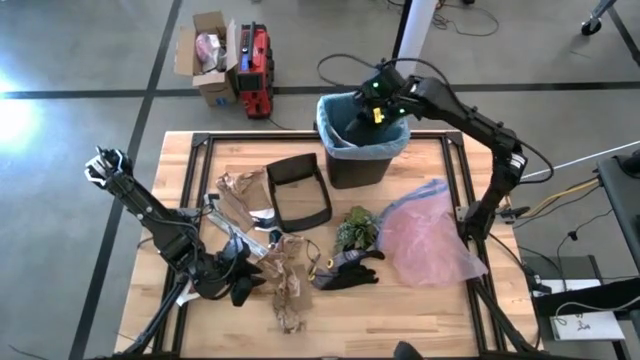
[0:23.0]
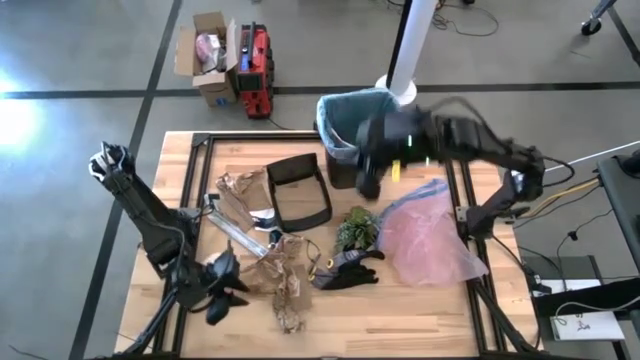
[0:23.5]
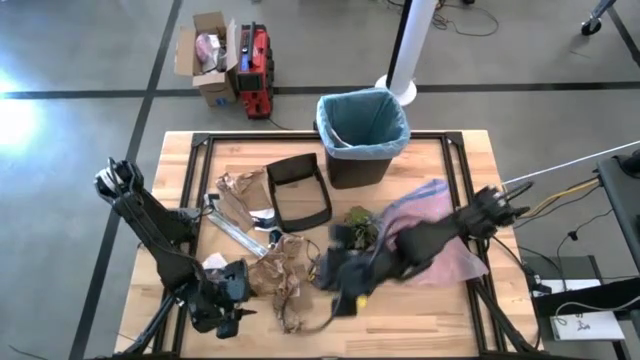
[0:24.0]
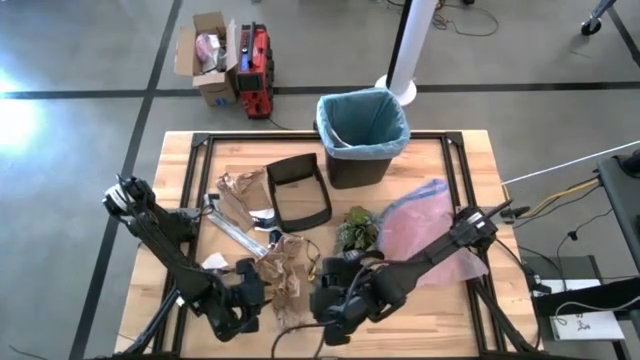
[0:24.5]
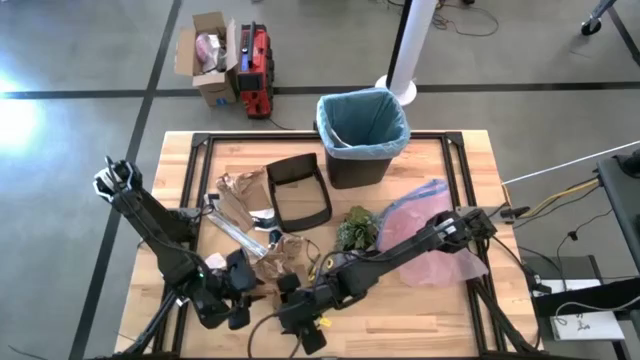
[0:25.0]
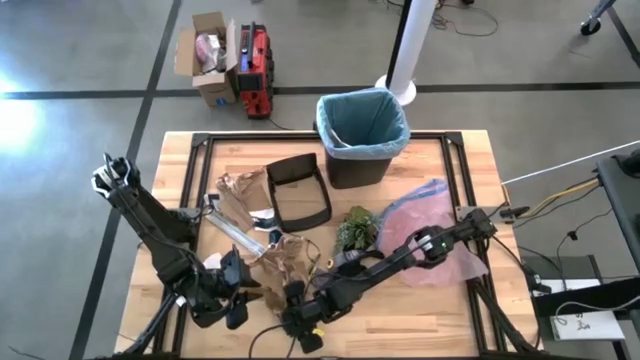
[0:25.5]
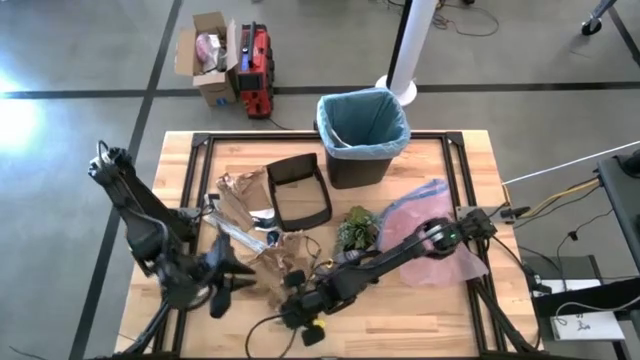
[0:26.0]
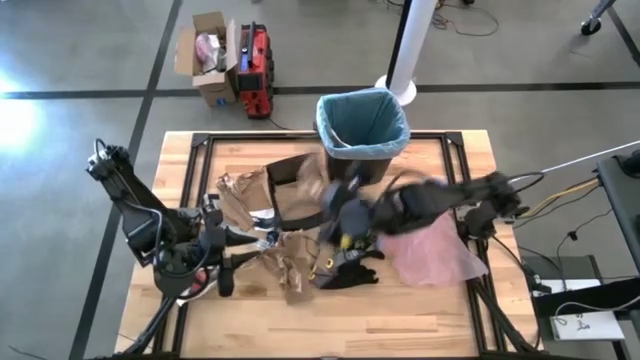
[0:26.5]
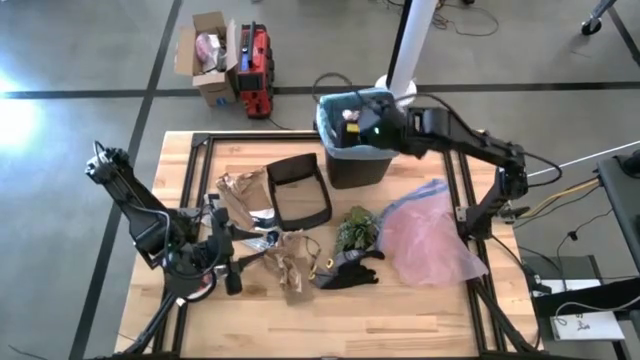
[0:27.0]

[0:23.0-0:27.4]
Task: place trash/remove bag and relplace
Put the brown napkin into the trash bin

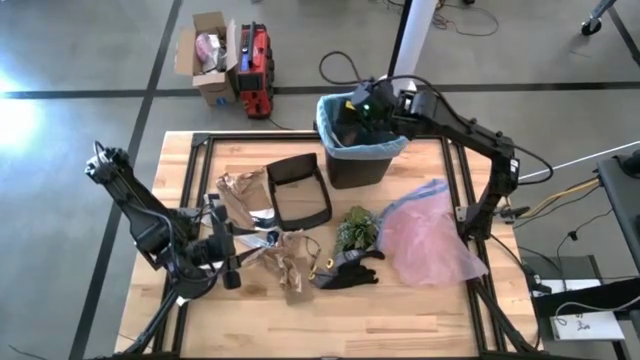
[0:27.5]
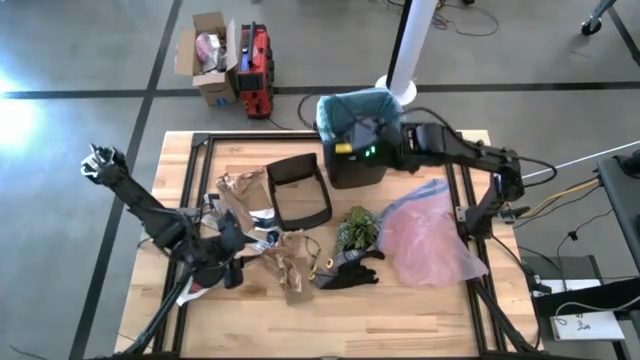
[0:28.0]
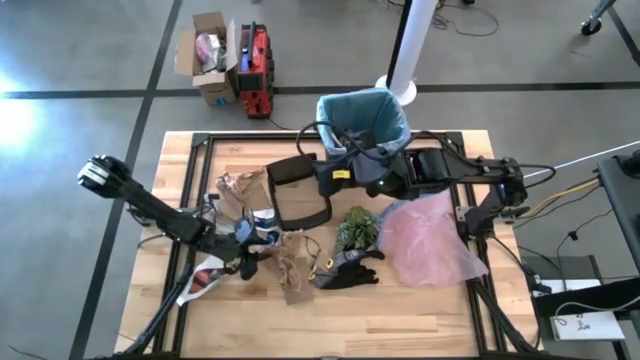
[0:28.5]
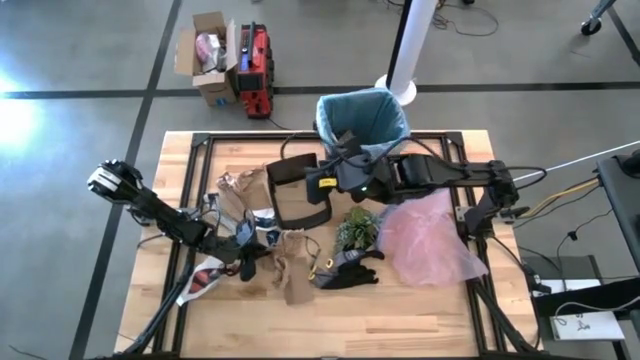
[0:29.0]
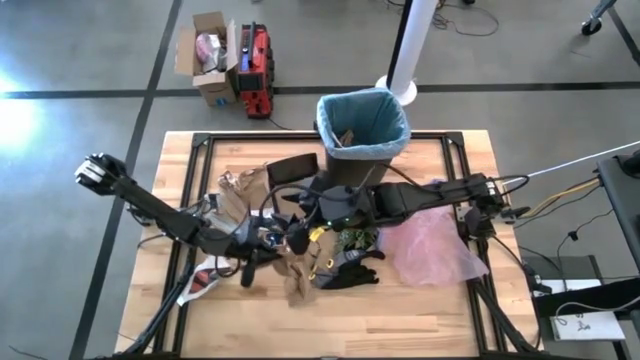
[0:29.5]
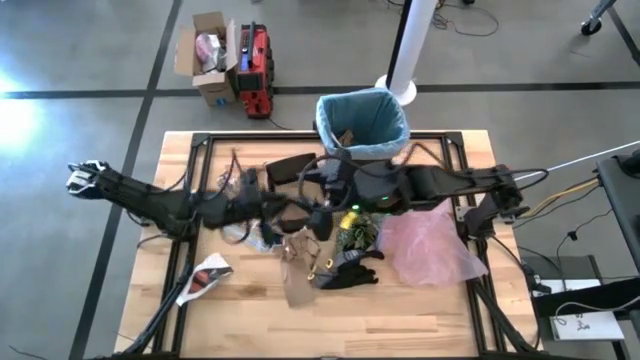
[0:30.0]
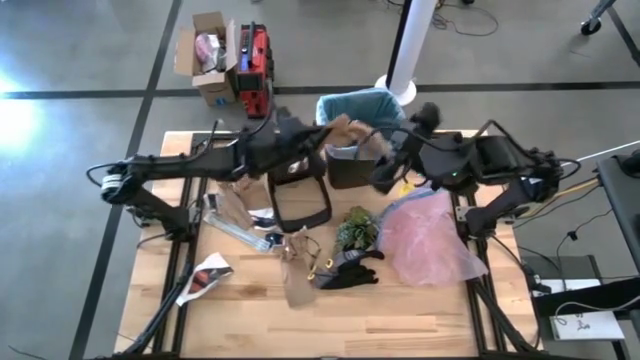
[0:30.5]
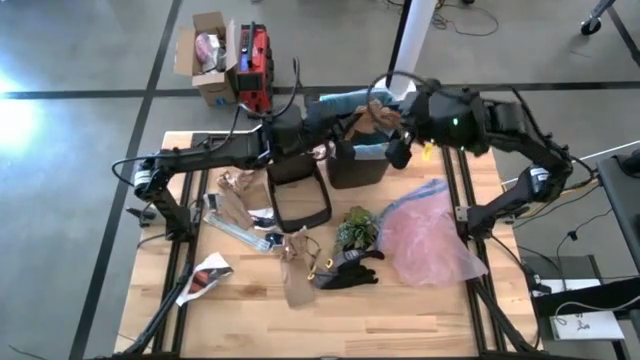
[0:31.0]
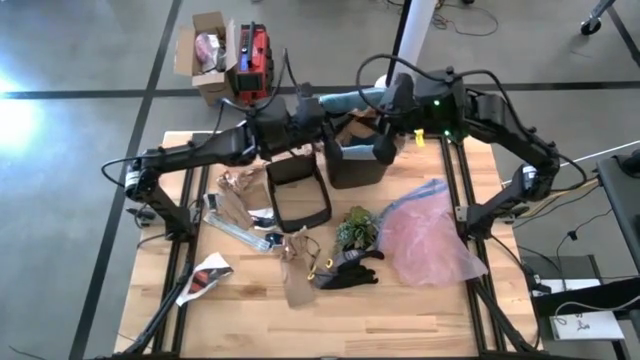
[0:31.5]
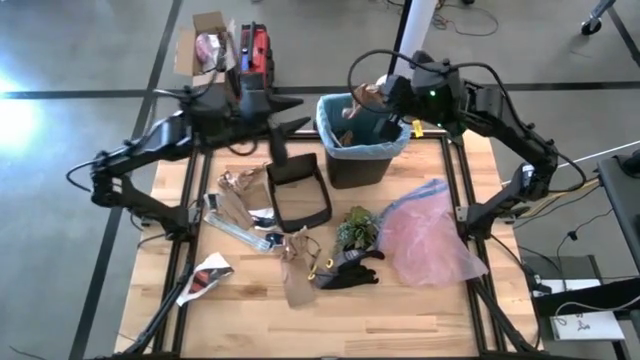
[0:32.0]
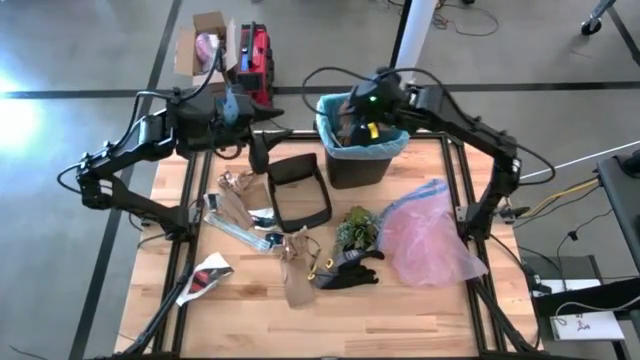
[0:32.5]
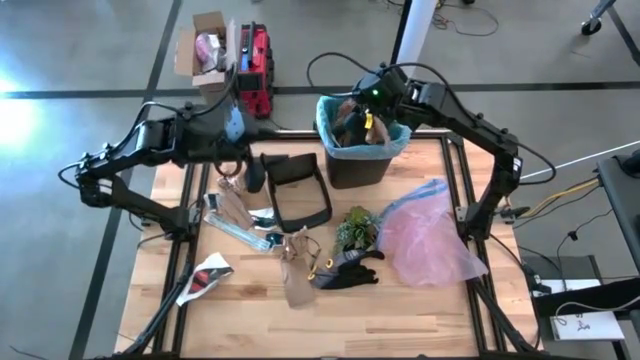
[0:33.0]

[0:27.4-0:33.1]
Put the brown napkin into the trash bin

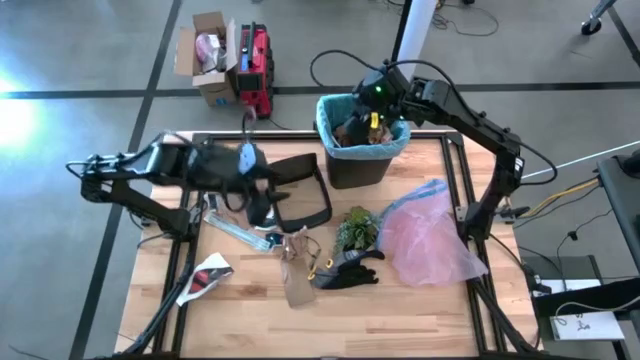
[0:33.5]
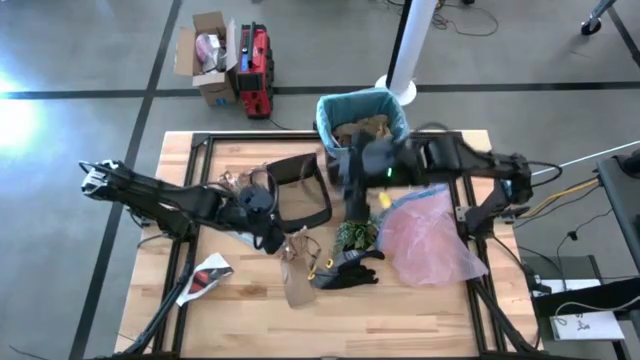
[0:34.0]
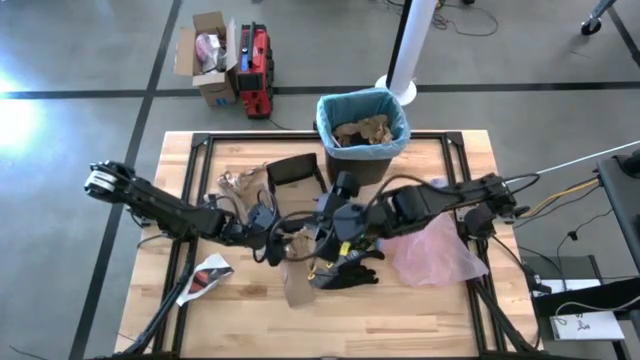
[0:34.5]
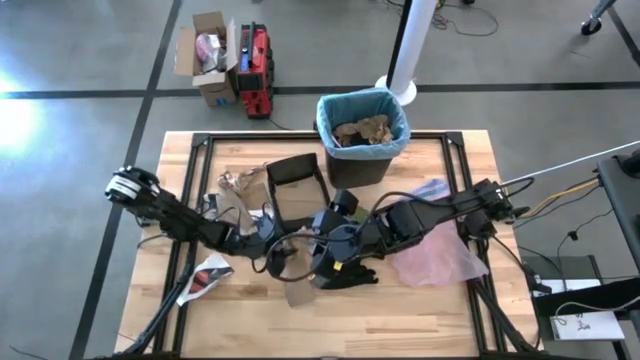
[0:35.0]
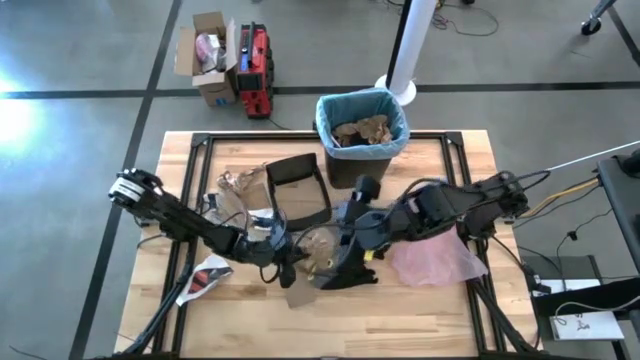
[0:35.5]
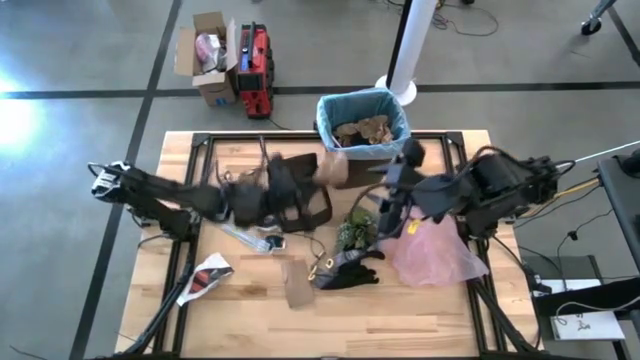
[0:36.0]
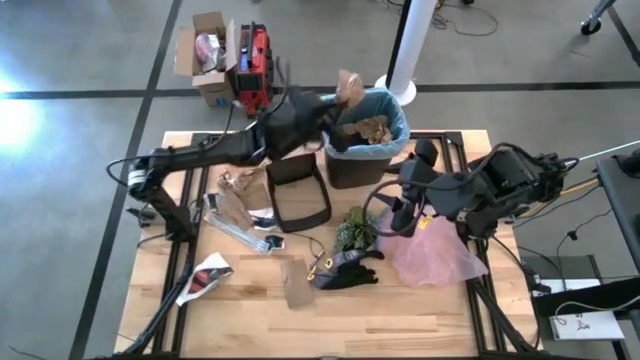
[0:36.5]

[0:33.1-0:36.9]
Put the brown napkin into the trash bin

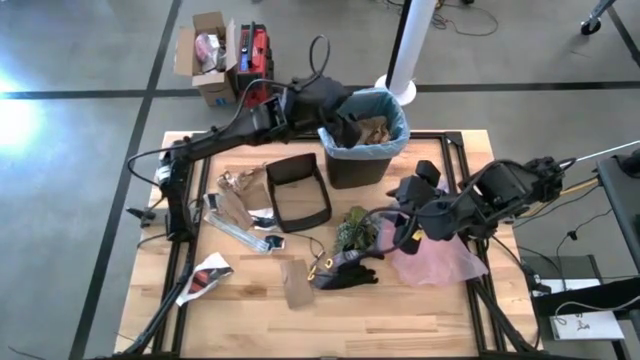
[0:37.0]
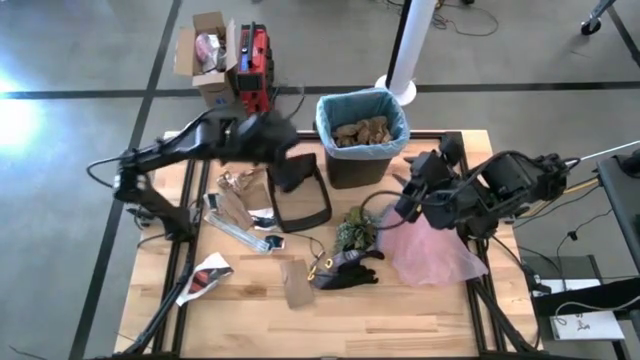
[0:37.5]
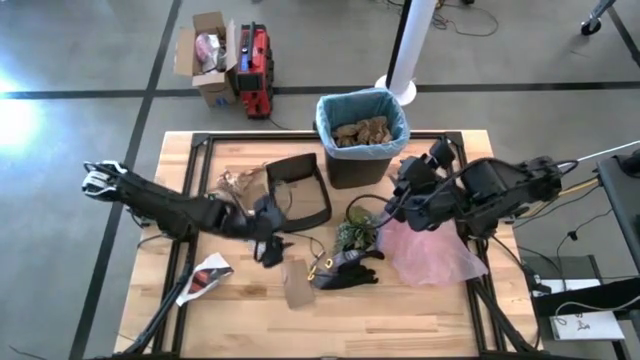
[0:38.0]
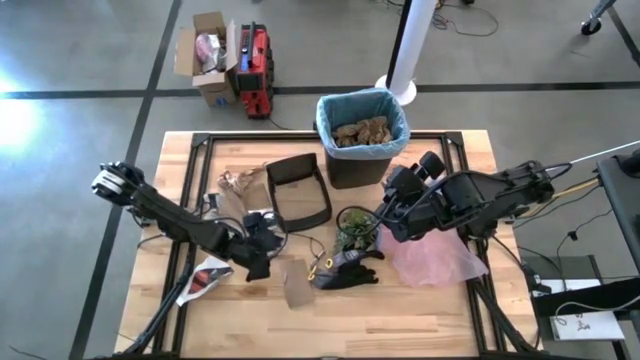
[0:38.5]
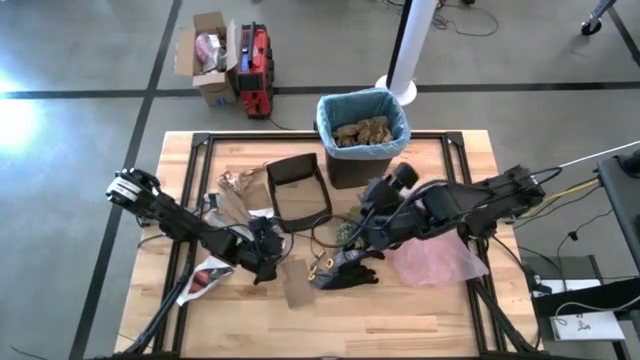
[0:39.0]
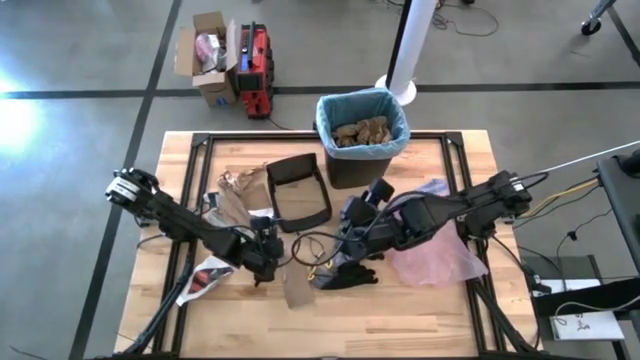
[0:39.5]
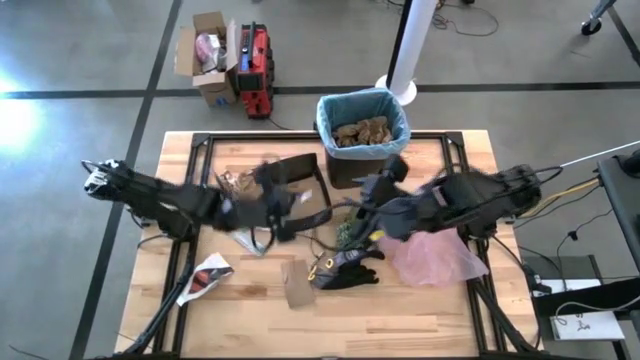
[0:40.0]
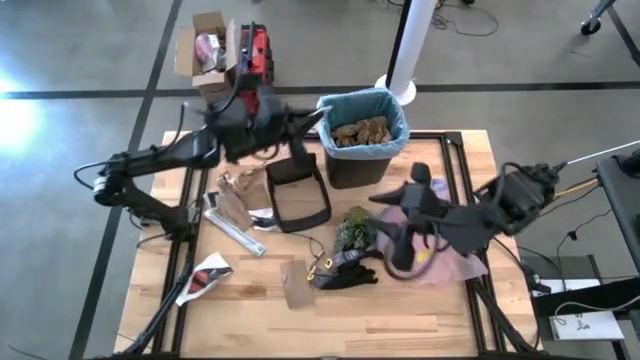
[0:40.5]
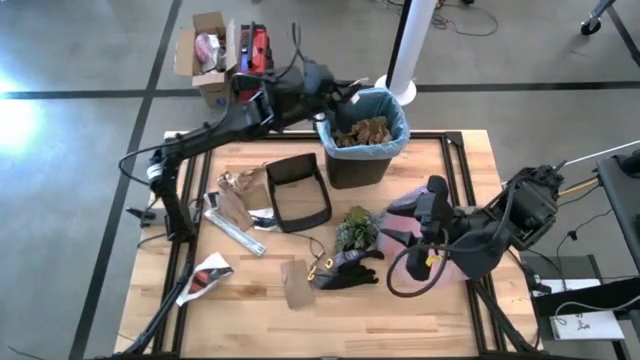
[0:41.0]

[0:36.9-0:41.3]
Put the black paper into the trash bin

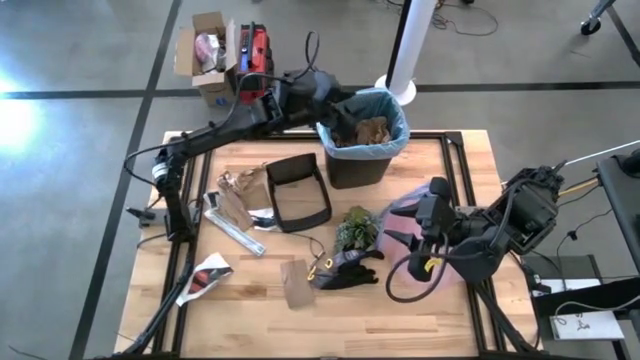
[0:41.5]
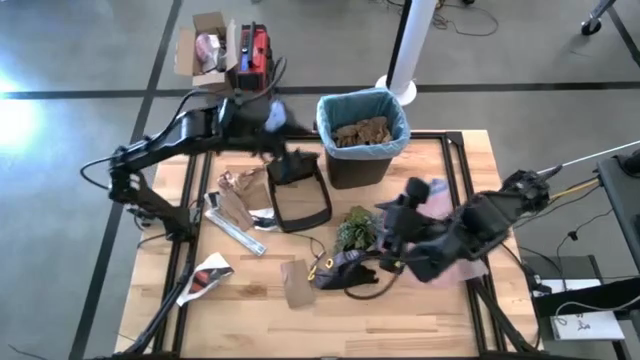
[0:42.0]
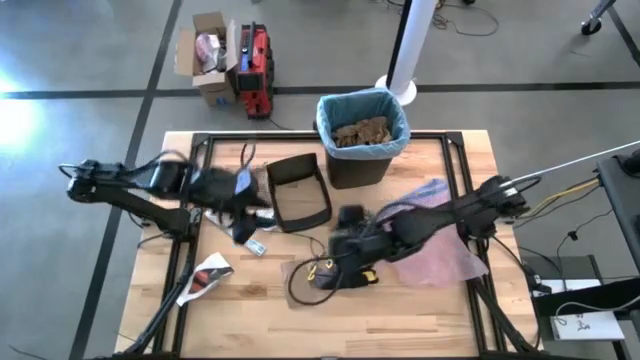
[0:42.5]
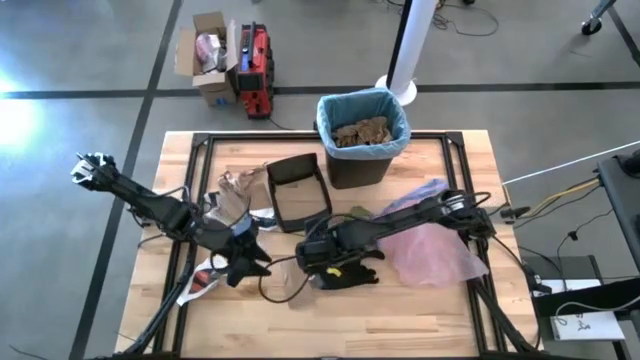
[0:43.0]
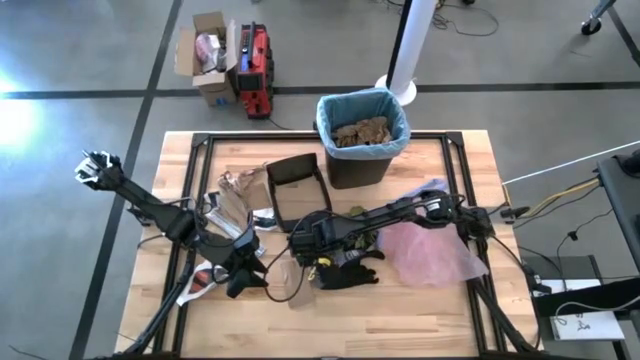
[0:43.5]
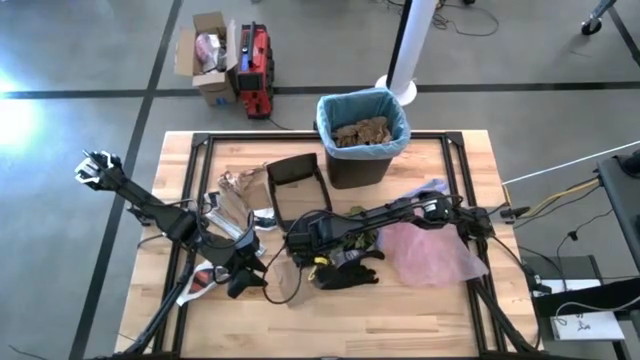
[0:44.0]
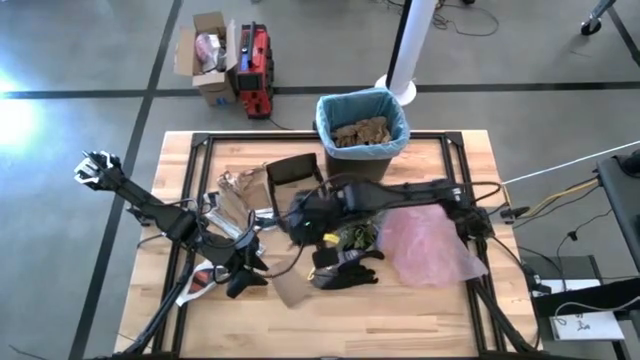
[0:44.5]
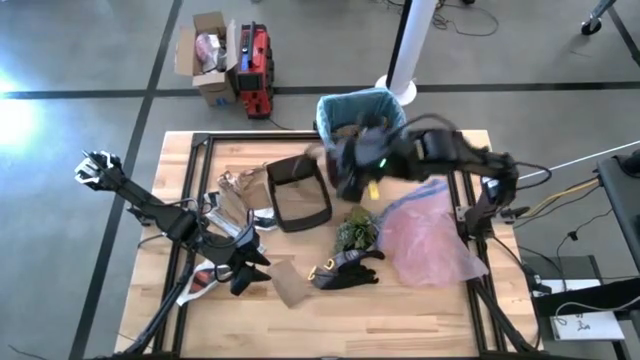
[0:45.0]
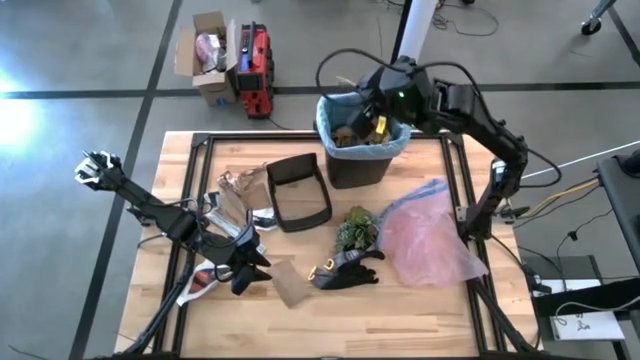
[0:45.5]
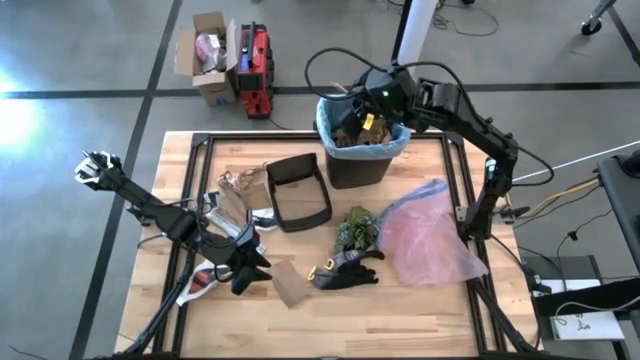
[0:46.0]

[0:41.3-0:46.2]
Put the cables into the trash bin
